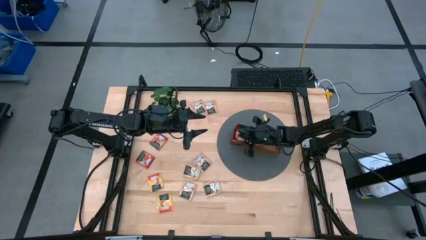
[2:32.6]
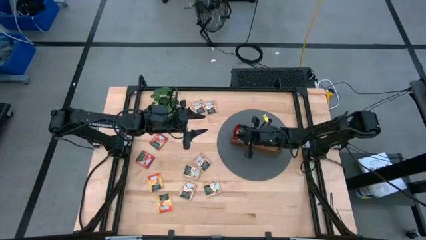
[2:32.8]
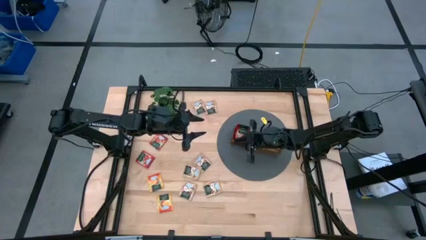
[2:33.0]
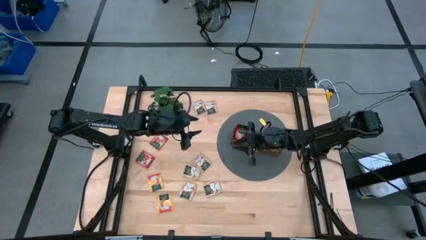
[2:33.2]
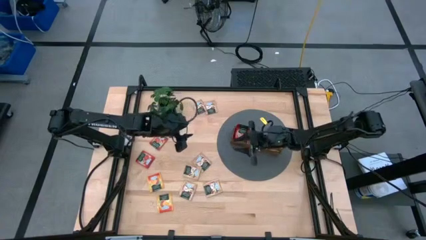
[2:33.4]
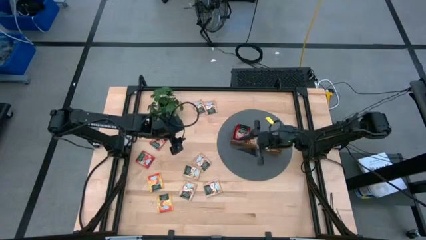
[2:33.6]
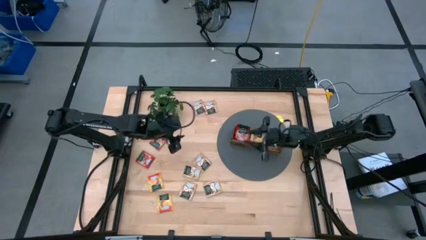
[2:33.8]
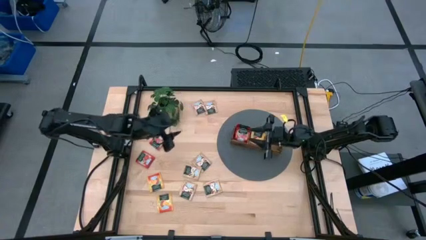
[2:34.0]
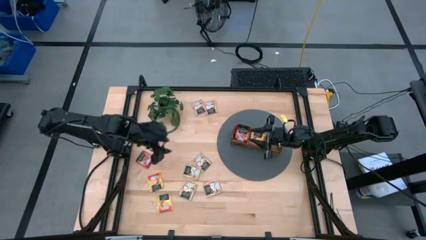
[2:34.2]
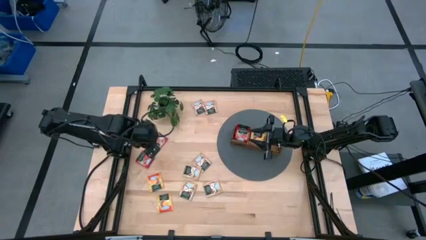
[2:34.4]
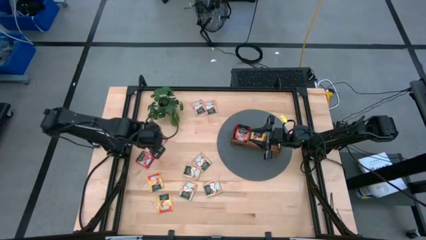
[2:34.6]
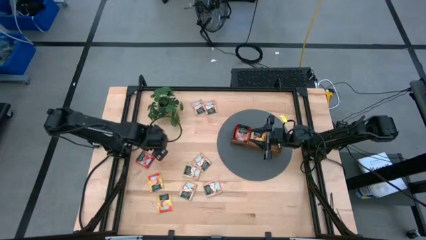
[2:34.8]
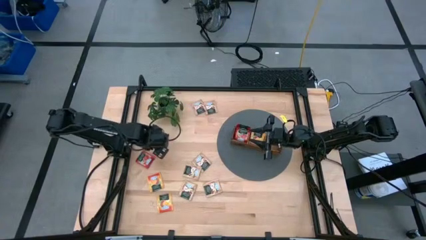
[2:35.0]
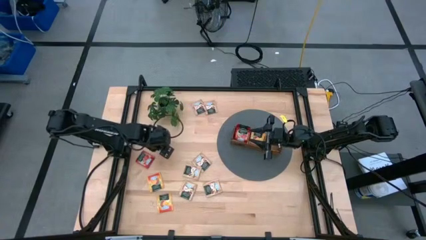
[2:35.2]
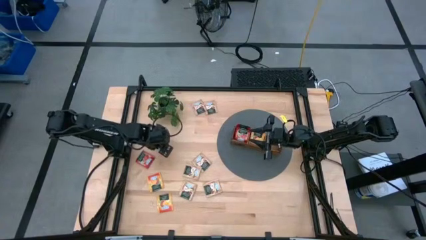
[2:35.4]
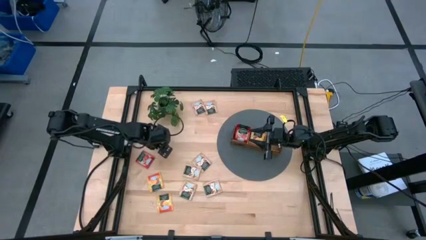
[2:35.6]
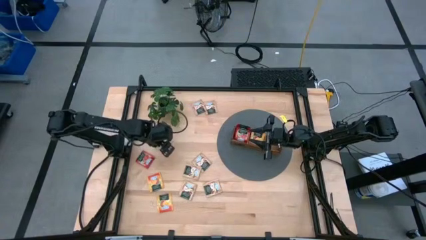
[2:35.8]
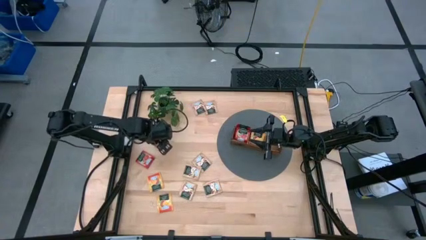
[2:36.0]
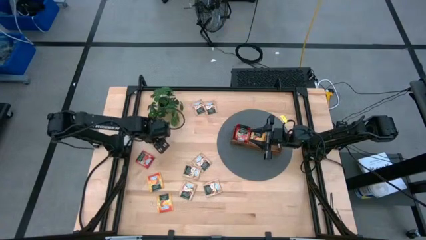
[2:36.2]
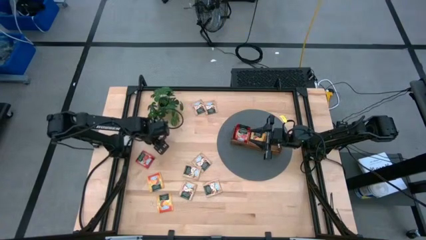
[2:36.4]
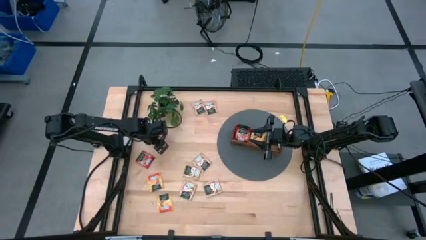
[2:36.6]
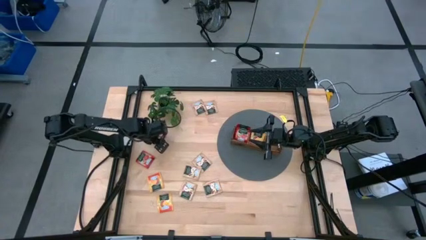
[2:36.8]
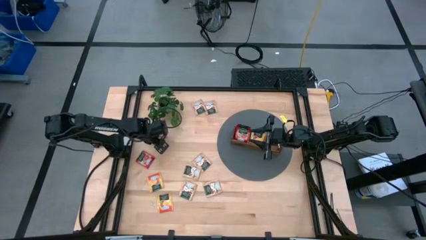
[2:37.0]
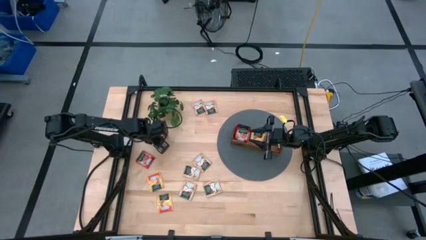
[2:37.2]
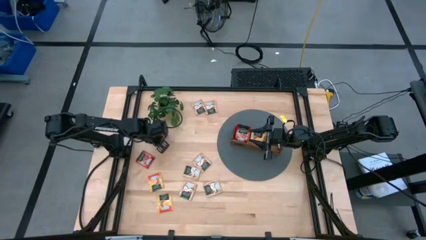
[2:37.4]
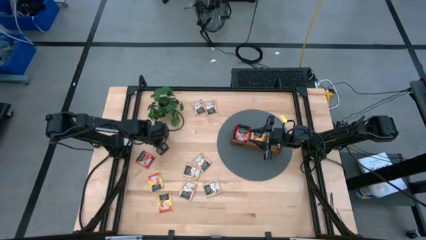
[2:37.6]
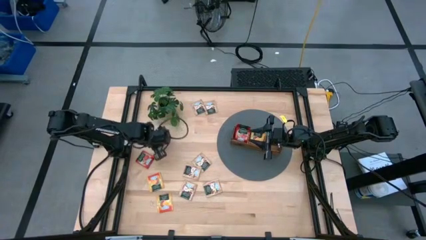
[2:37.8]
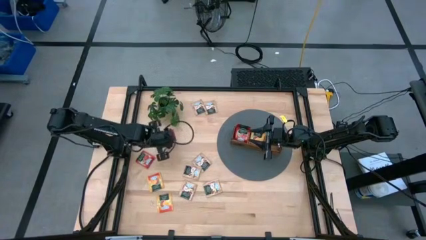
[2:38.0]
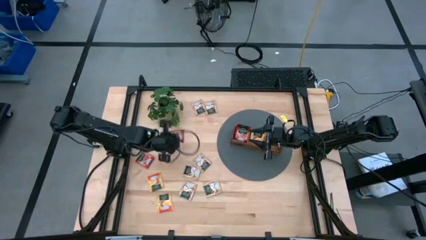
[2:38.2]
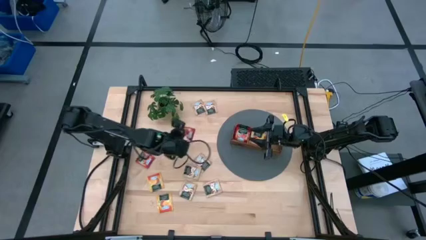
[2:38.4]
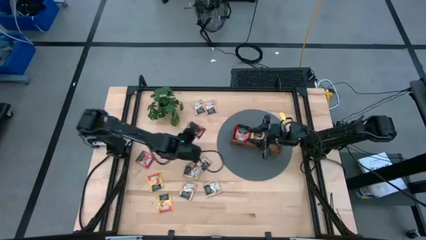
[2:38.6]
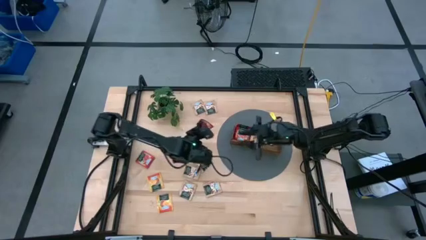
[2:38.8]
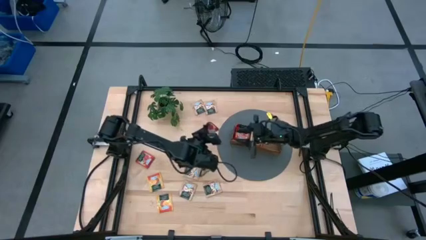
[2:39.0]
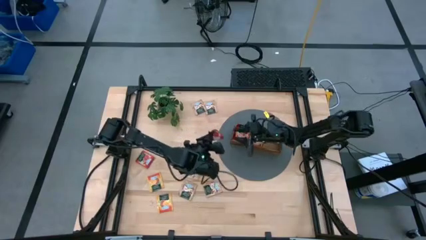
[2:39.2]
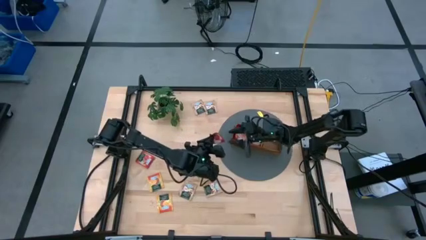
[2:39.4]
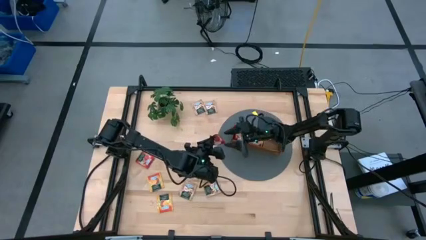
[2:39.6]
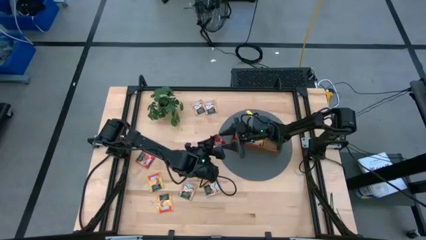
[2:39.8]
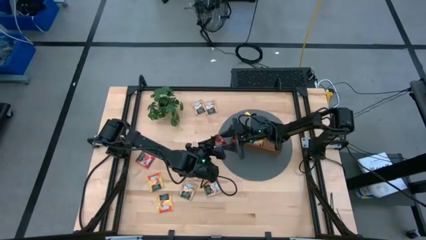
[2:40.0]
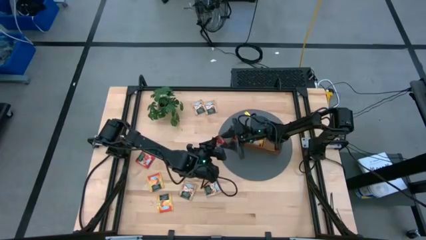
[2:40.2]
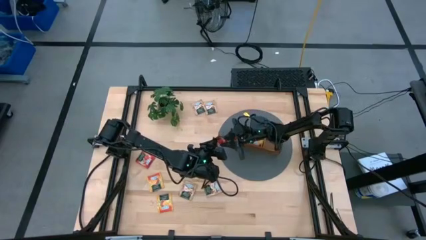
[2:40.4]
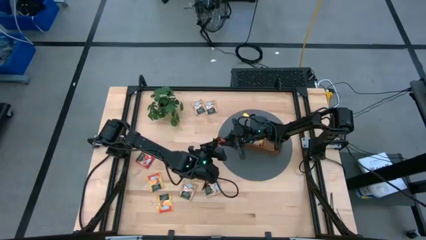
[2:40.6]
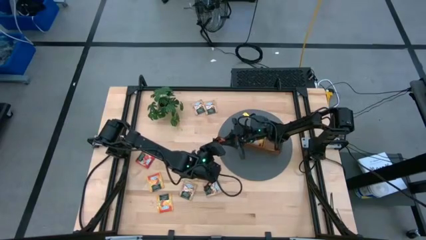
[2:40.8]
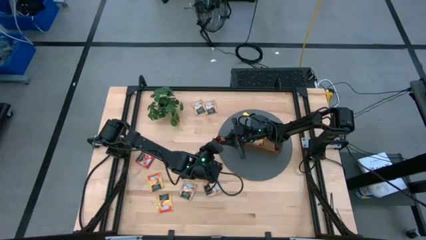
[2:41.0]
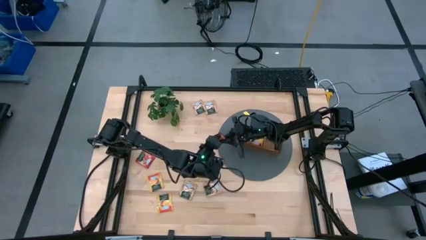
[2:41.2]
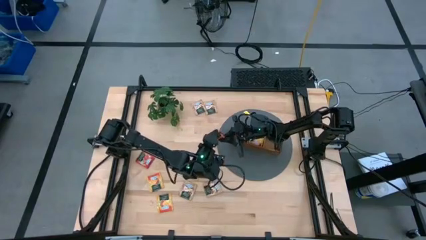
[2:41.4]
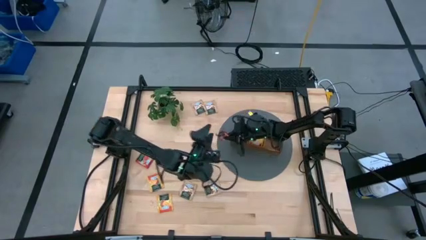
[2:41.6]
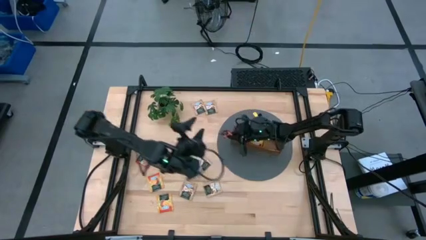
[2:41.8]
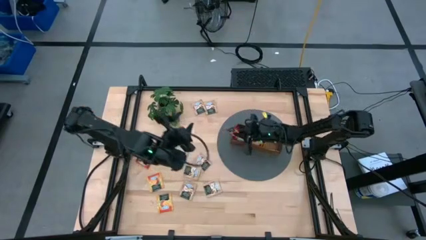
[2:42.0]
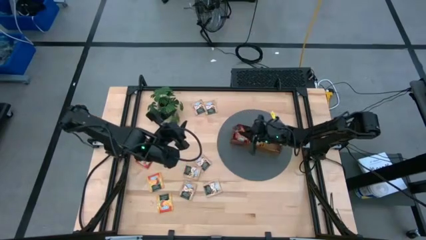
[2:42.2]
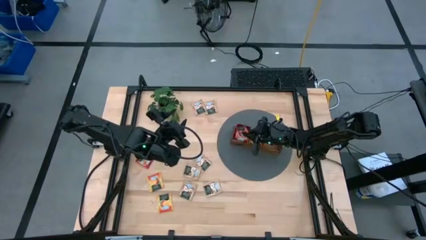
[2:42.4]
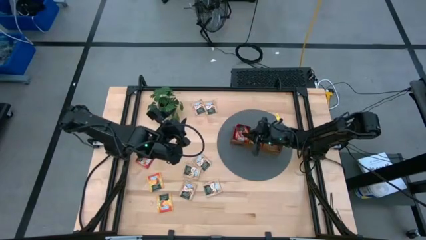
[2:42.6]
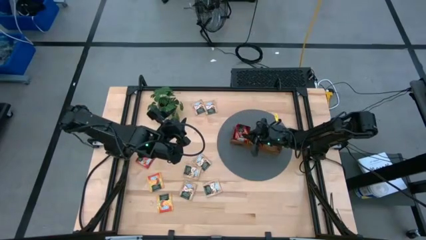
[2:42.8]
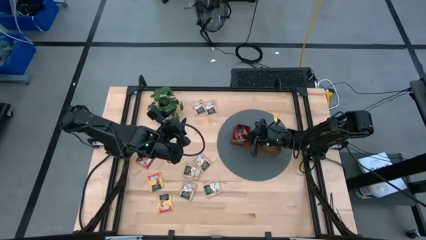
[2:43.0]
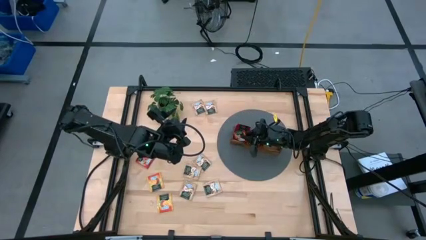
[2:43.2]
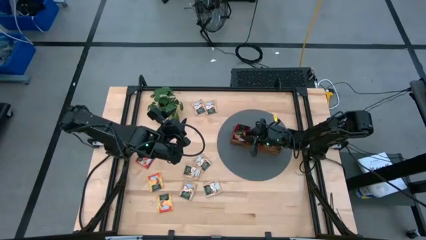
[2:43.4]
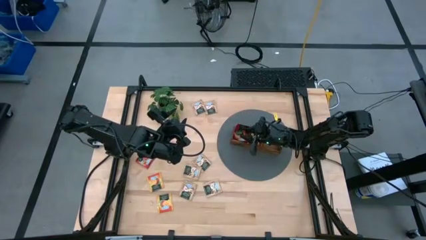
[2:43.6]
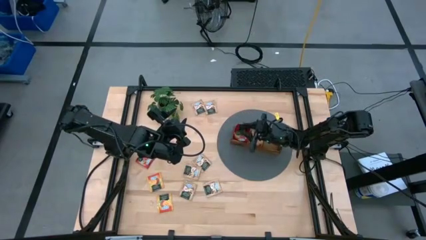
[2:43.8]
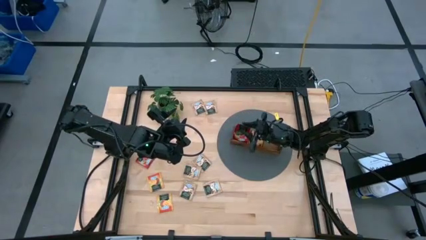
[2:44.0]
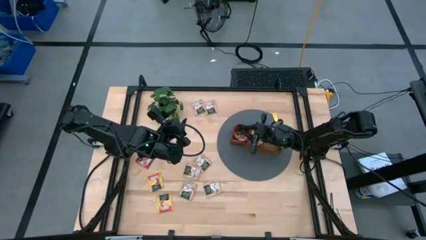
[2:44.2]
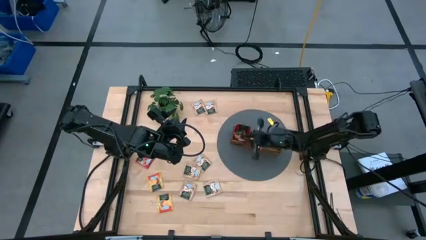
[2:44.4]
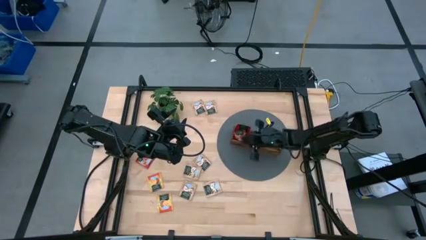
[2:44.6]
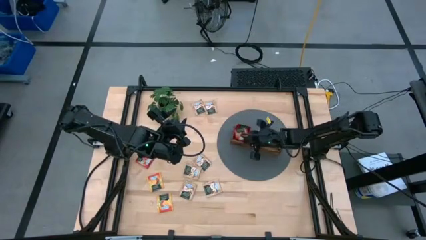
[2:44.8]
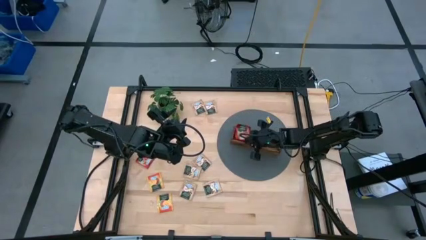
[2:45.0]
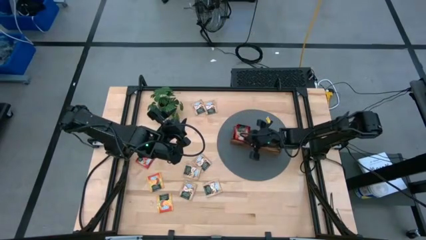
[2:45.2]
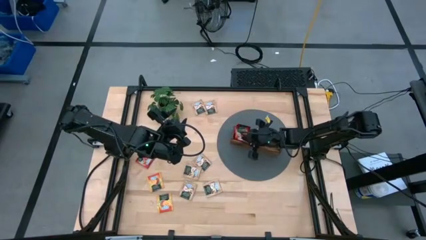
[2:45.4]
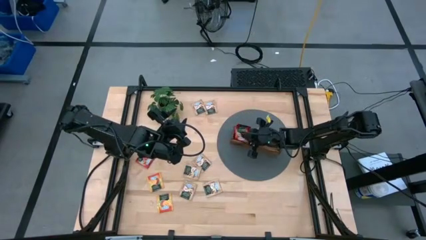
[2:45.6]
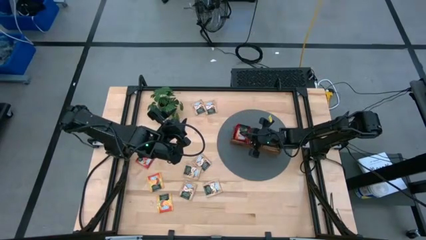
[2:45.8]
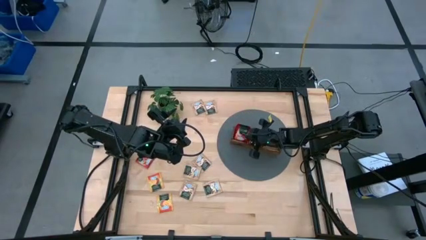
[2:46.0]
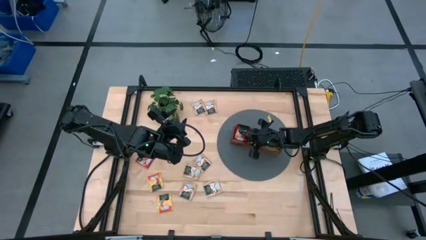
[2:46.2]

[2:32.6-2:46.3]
Task: Pick & Place Tea
Put the red tea bag into the left section of the wooden organizer

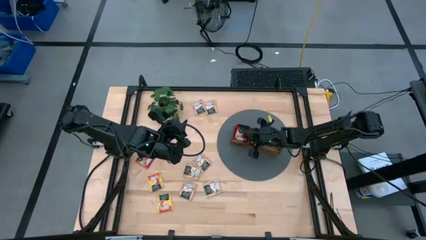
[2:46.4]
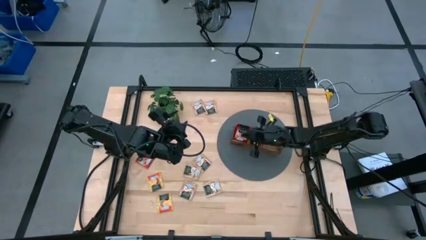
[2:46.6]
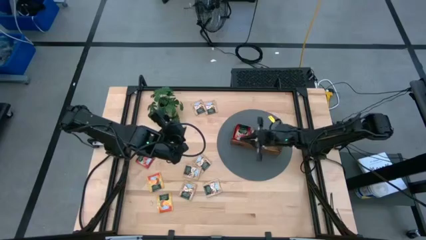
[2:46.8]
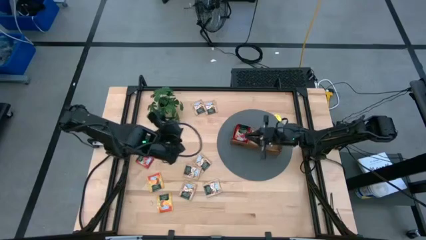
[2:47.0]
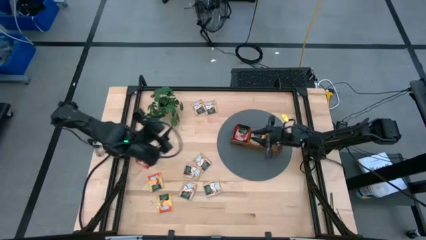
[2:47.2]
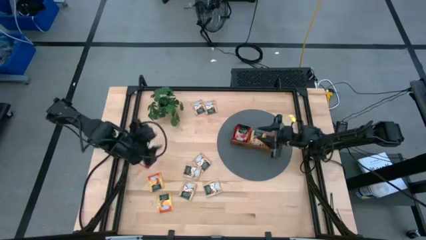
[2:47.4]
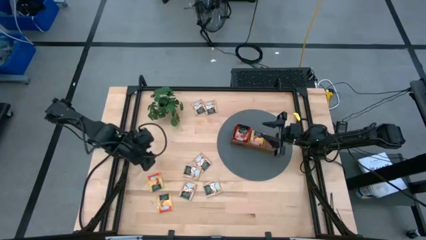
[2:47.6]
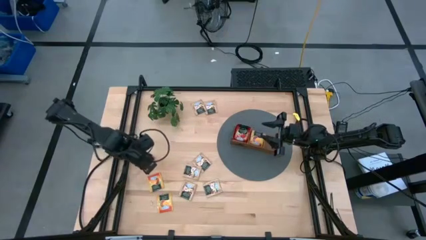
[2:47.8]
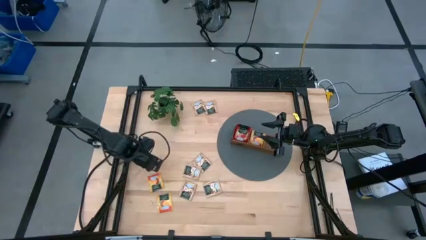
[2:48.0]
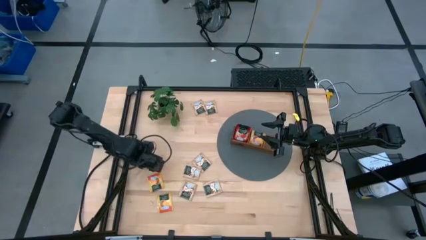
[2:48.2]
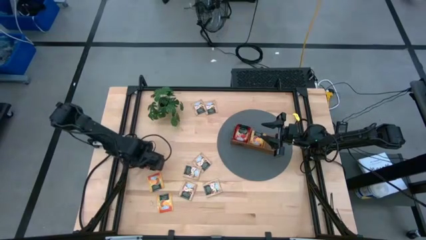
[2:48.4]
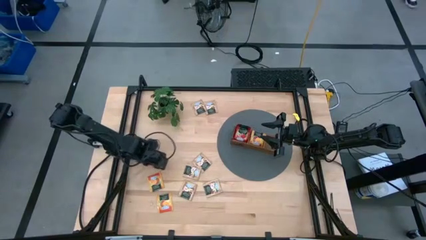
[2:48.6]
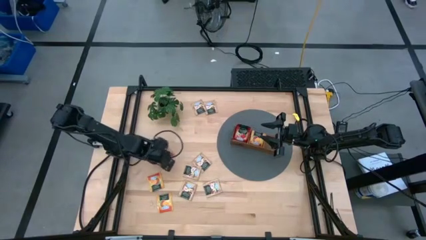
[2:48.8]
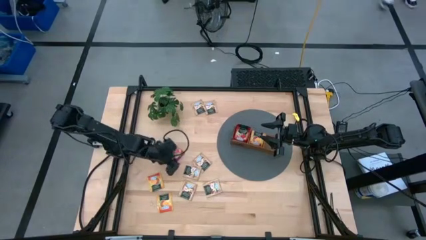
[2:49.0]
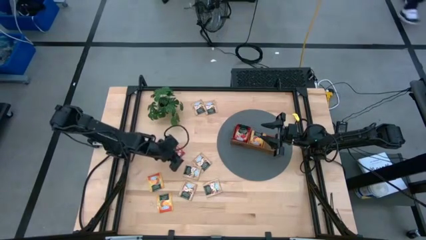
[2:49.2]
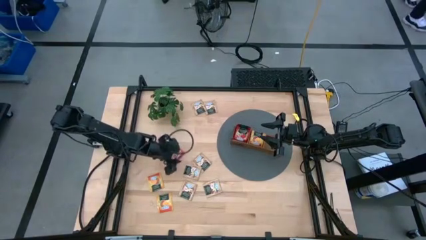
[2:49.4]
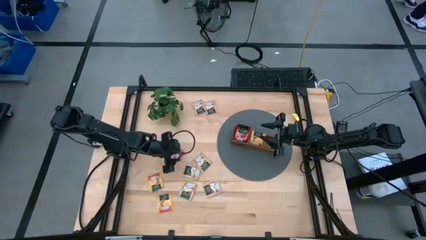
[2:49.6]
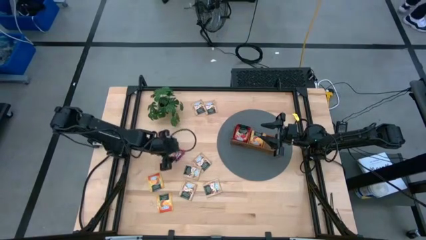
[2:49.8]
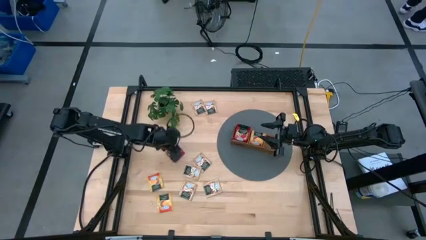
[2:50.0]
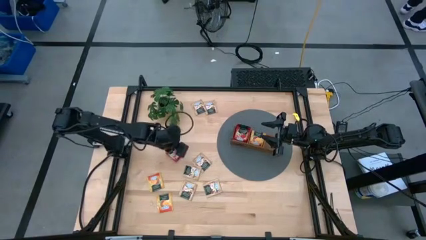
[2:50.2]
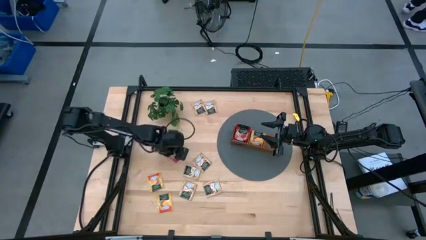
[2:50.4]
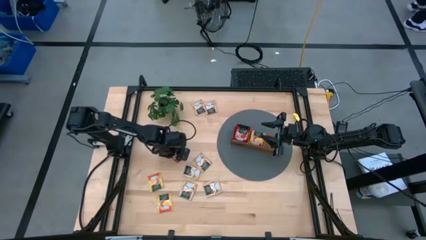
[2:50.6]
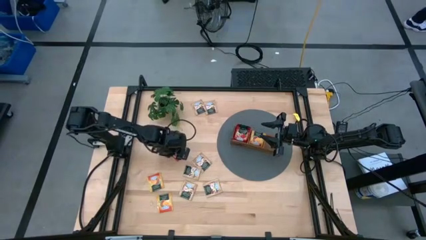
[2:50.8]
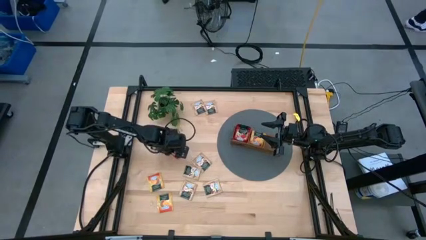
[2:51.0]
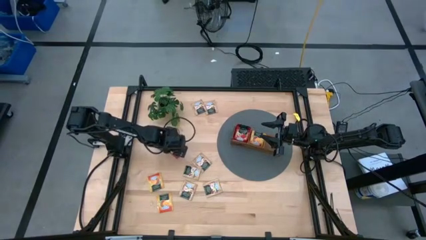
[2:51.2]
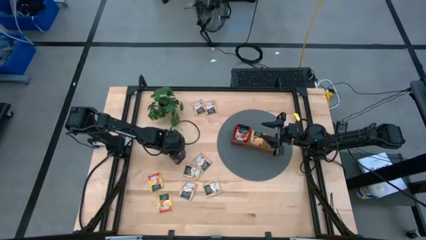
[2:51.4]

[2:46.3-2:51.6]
Put the red tea bag into the left section of the wooden organizer
